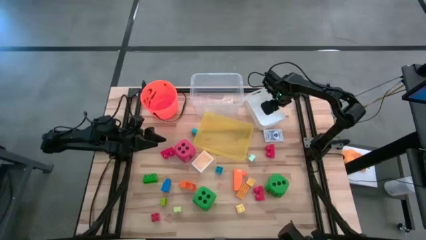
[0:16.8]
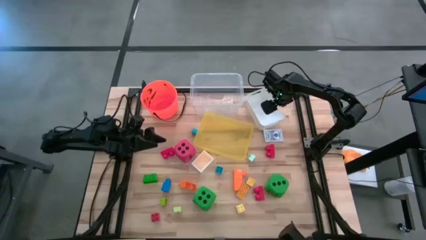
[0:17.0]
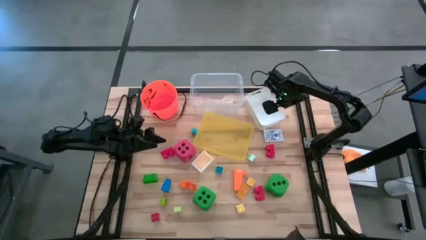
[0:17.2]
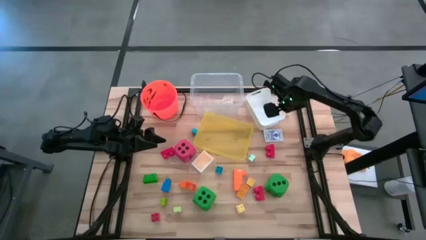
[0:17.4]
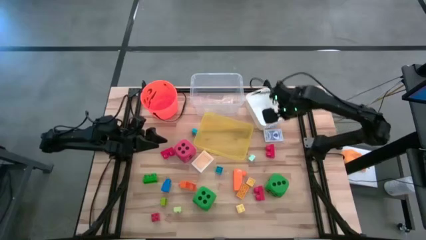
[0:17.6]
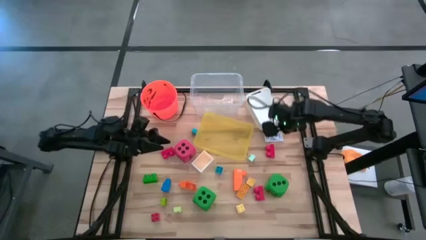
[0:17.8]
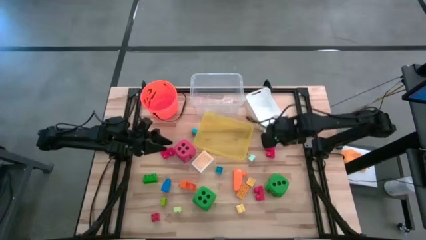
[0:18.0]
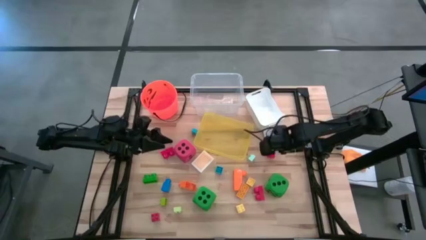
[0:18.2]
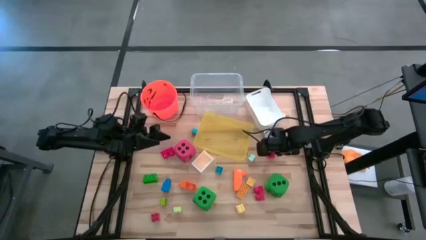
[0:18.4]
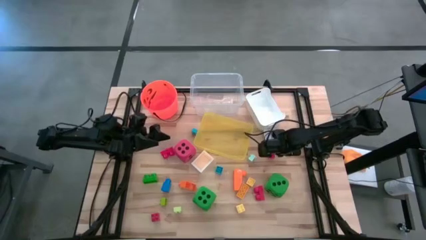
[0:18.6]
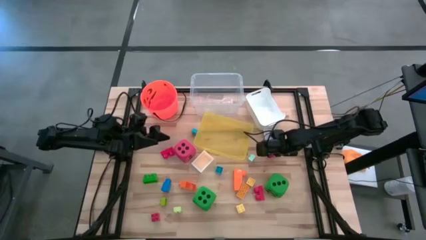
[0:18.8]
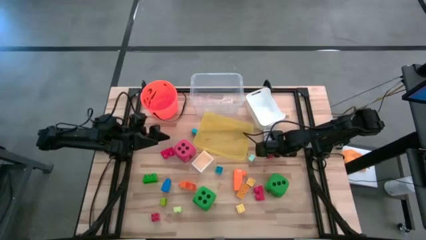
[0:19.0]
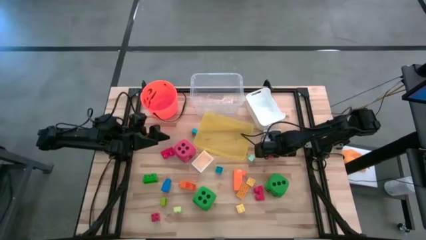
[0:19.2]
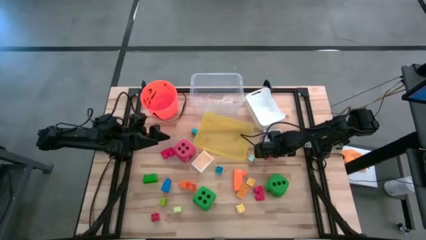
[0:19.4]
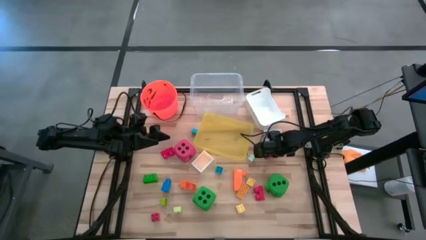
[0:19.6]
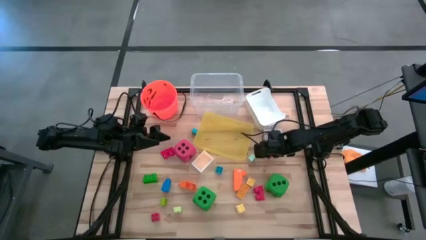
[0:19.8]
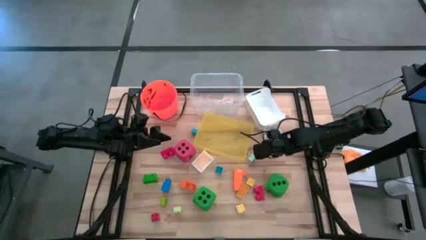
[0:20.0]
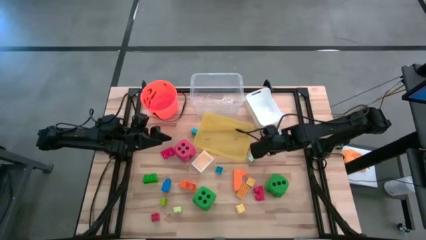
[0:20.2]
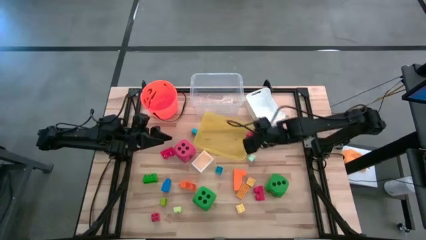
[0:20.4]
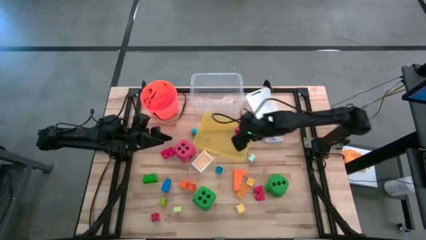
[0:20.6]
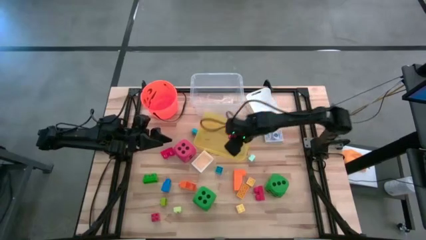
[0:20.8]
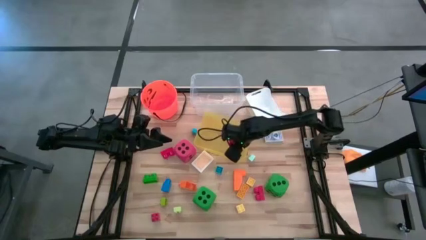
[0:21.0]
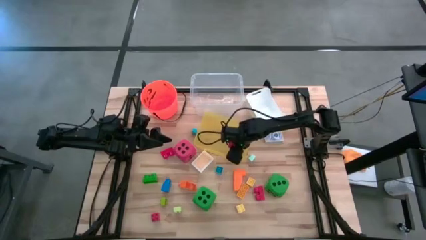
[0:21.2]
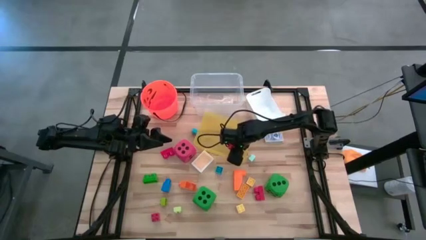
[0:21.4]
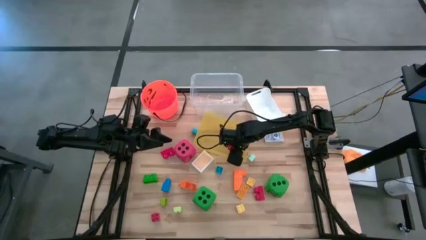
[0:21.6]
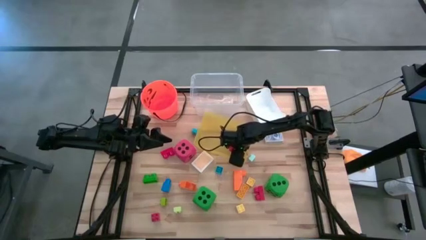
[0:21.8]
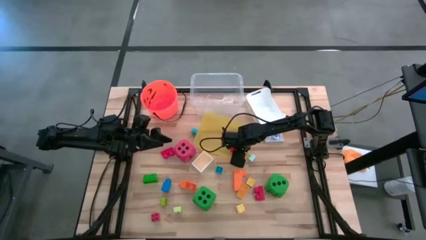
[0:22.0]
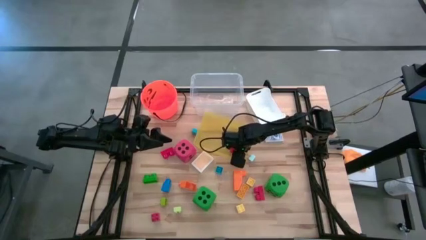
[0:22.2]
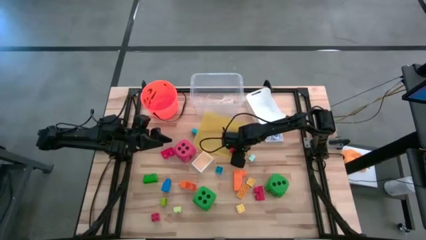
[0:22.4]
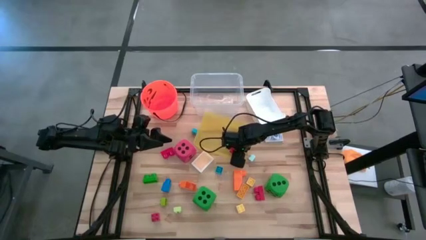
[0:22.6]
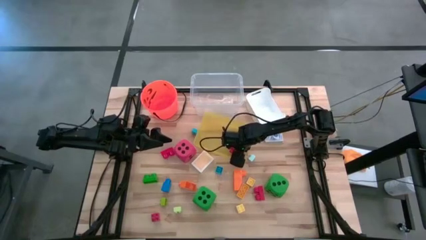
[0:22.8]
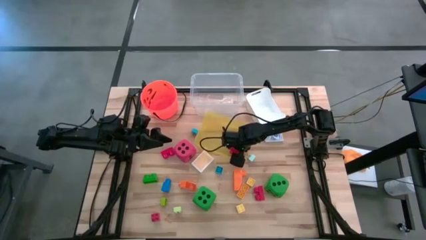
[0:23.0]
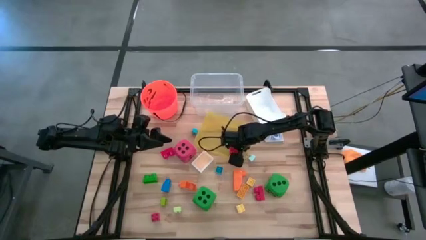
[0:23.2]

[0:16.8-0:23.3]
Task: Pick & Place Toys
Put the red game piece into the yellow bin

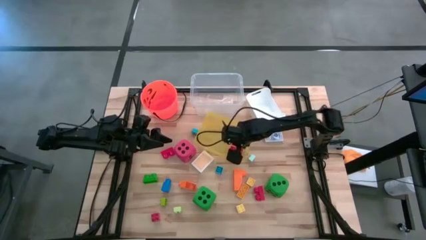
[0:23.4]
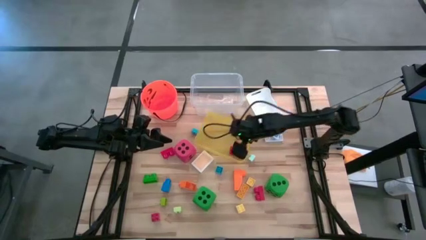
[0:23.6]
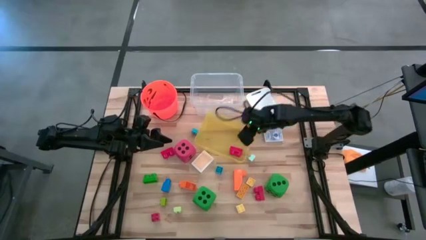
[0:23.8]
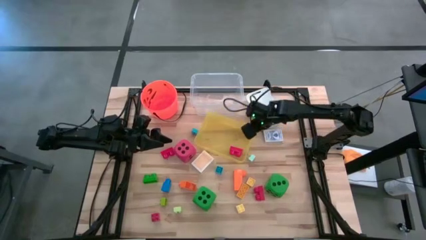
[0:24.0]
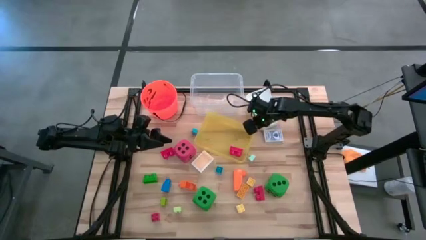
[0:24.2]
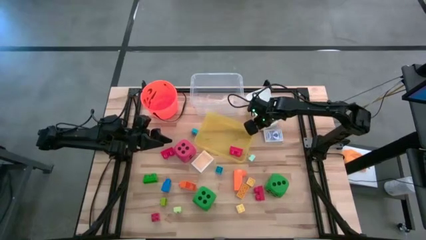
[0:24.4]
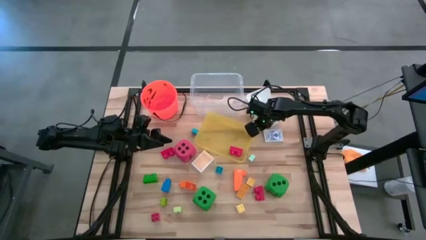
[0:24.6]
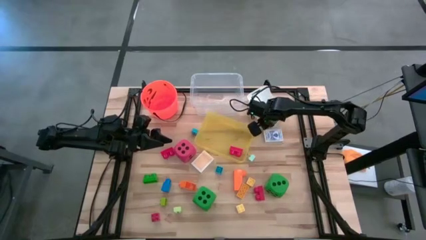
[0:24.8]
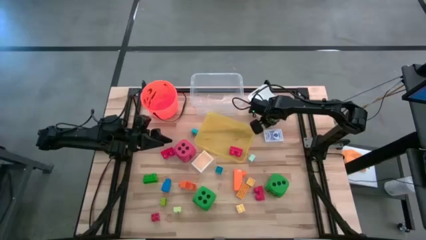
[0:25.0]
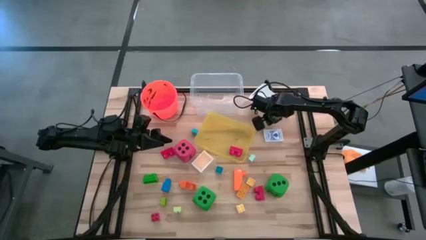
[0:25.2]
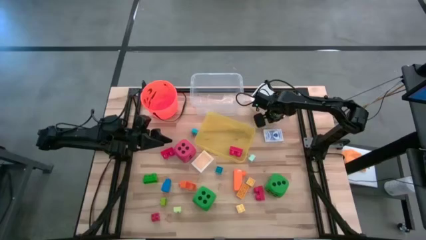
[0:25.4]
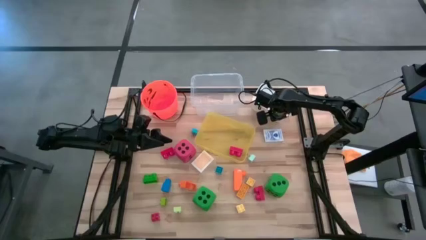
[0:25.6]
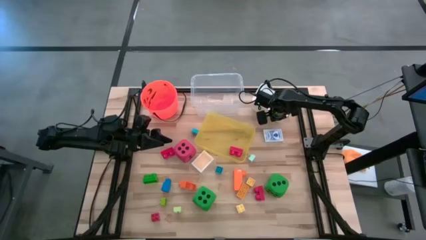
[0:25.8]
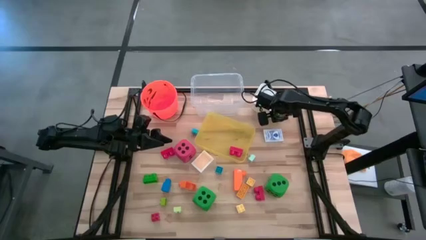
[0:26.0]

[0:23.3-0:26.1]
Adjust the white bin

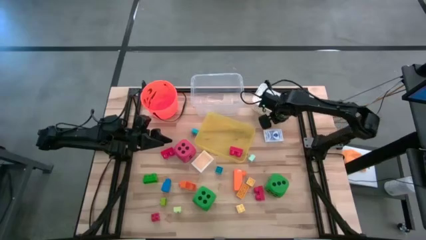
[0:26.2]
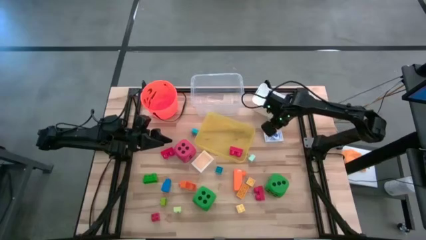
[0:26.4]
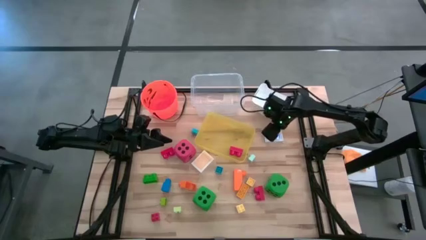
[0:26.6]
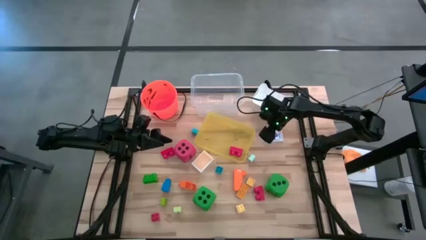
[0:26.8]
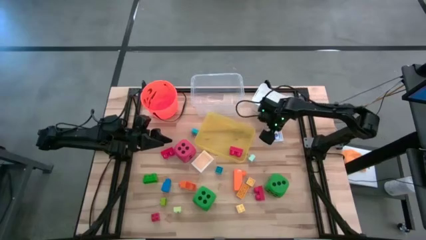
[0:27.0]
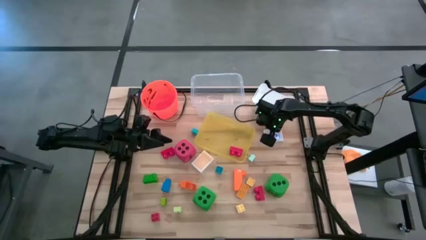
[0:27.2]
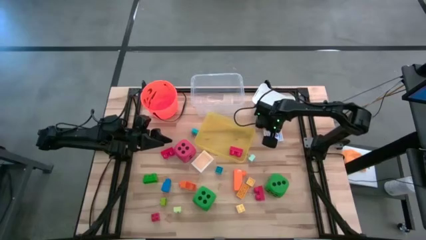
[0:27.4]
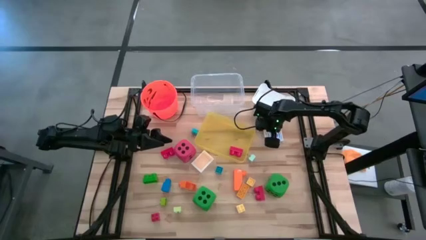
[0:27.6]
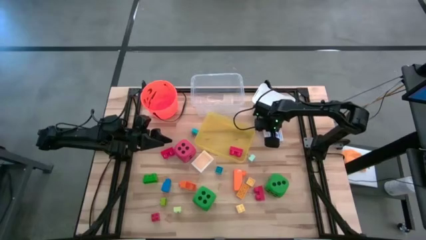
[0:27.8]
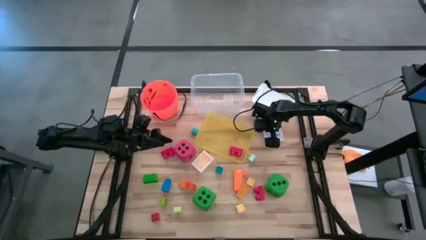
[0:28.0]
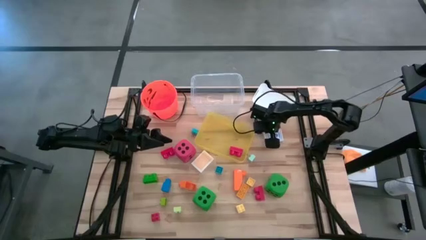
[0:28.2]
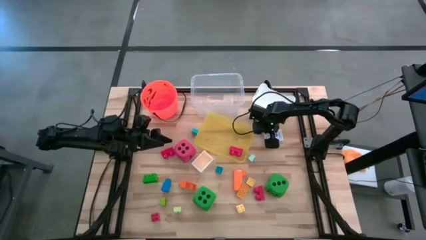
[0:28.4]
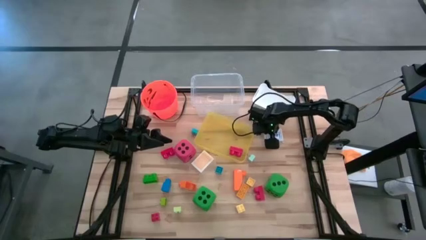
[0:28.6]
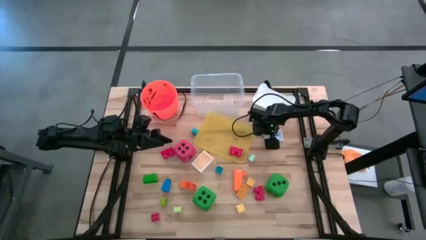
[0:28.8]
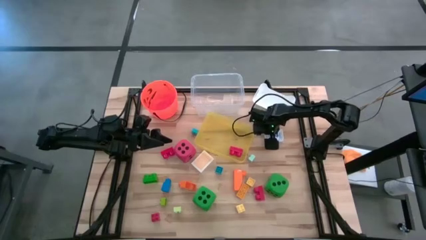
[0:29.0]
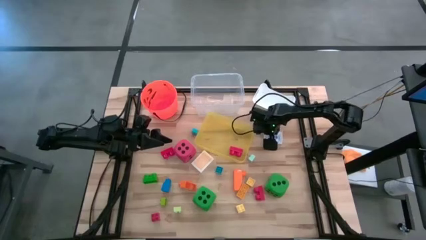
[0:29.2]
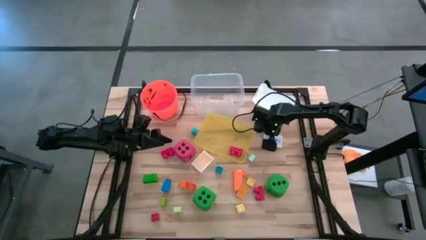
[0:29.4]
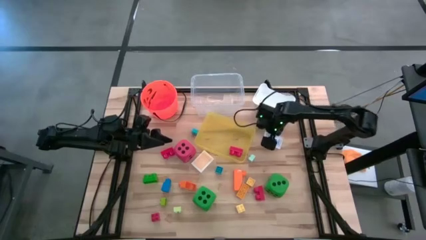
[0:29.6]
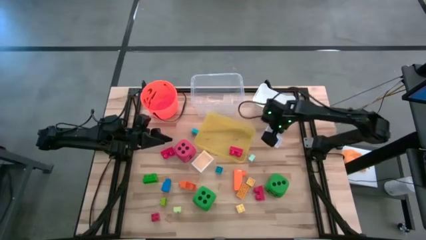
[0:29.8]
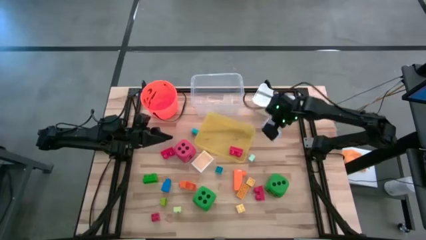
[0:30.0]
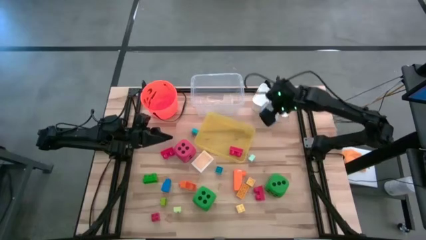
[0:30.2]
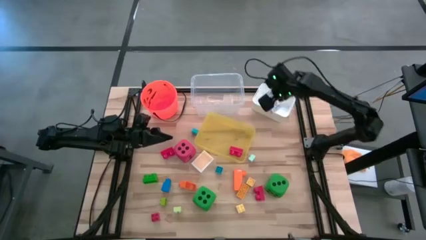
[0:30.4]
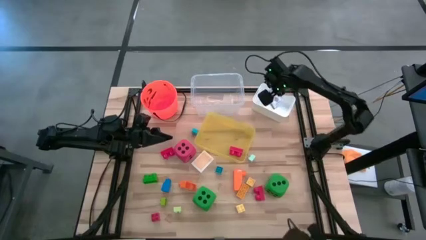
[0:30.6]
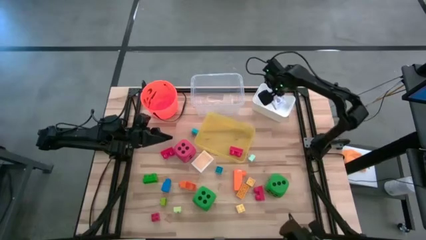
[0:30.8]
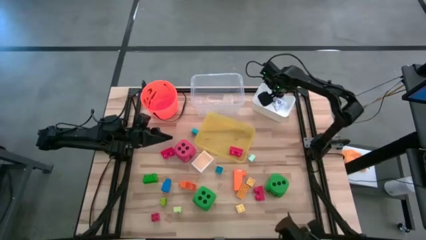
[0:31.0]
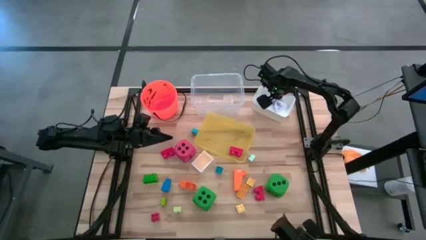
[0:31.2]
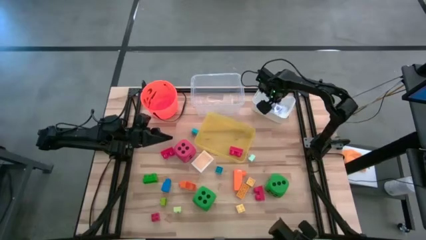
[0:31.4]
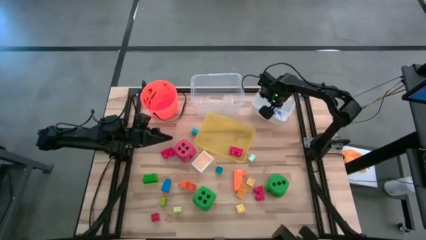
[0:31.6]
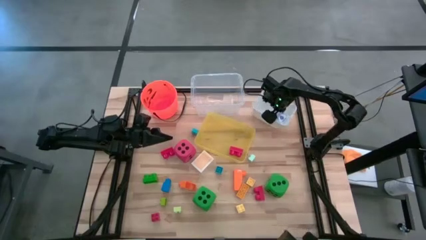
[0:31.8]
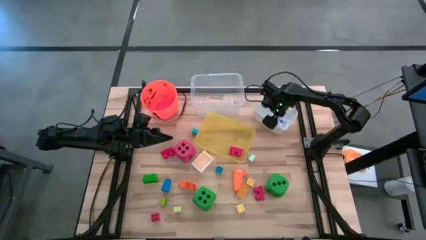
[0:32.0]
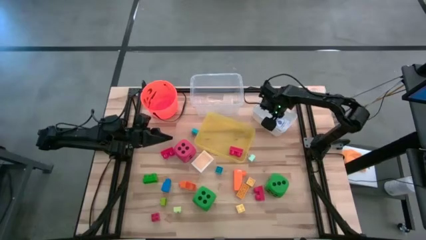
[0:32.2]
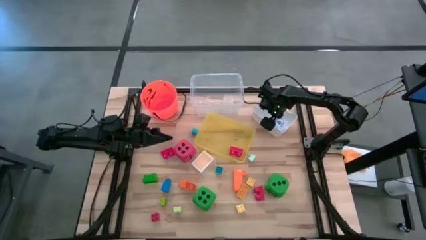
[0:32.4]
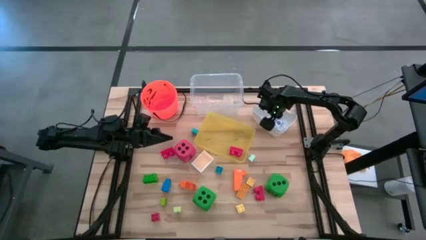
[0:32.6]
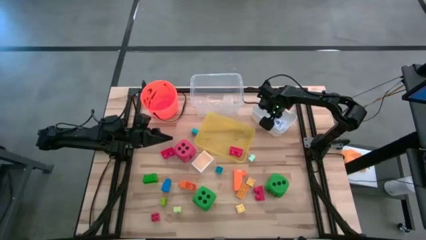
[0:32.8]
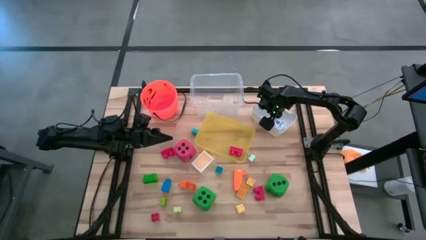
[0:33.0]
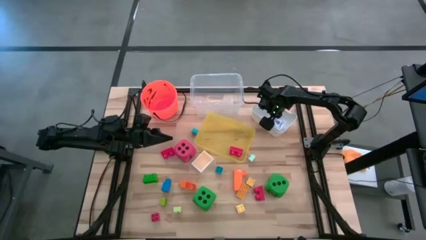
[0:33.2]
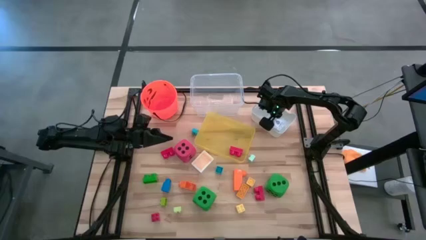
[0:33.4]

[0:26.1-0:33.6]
Put the blue game card into the white bin
